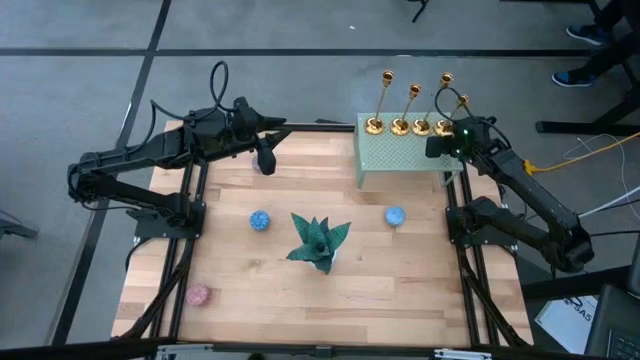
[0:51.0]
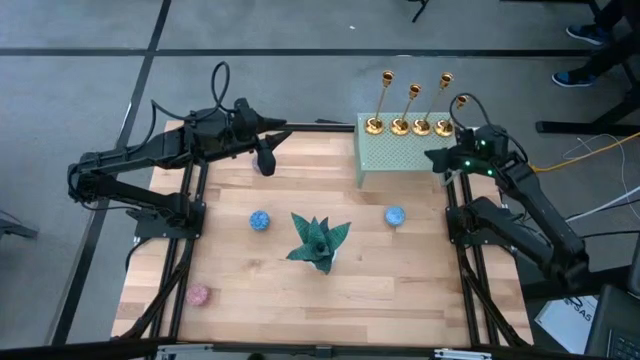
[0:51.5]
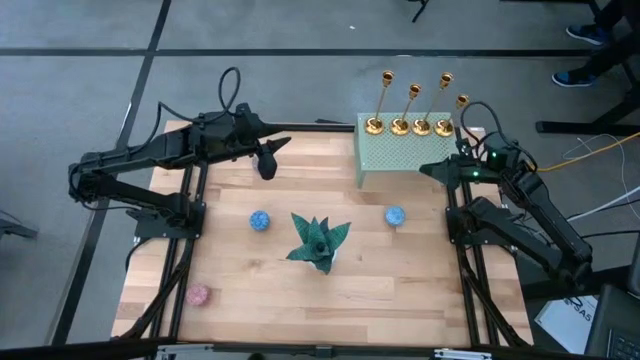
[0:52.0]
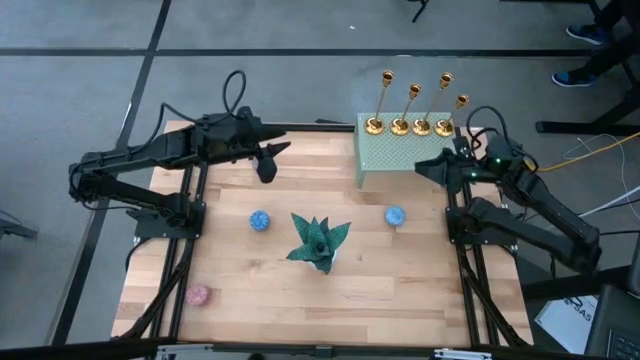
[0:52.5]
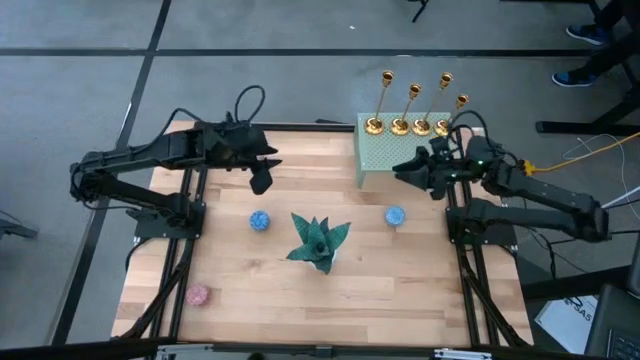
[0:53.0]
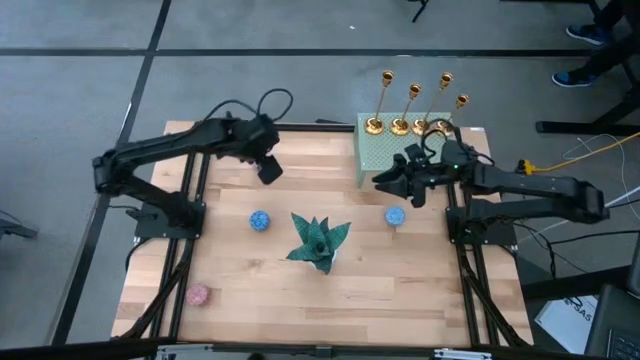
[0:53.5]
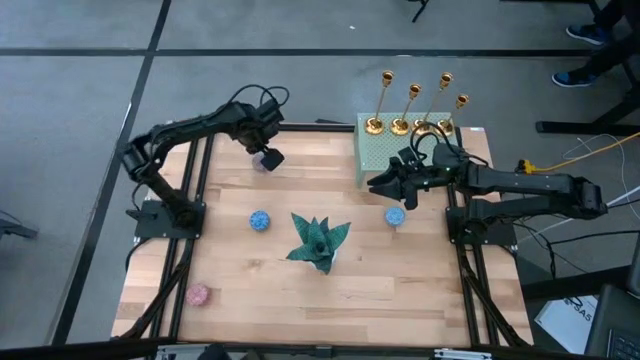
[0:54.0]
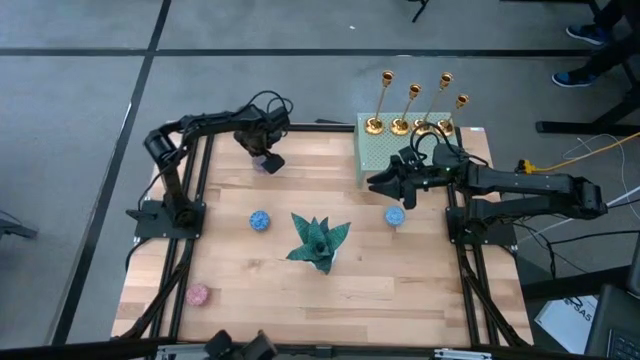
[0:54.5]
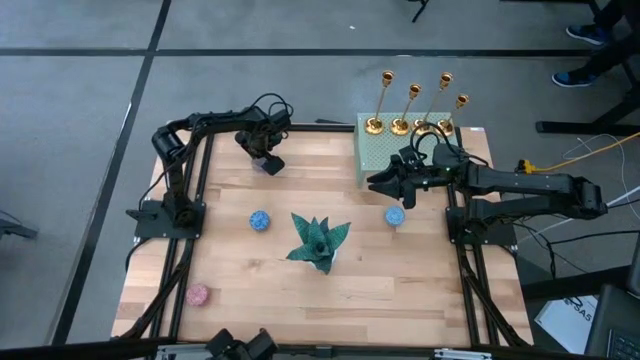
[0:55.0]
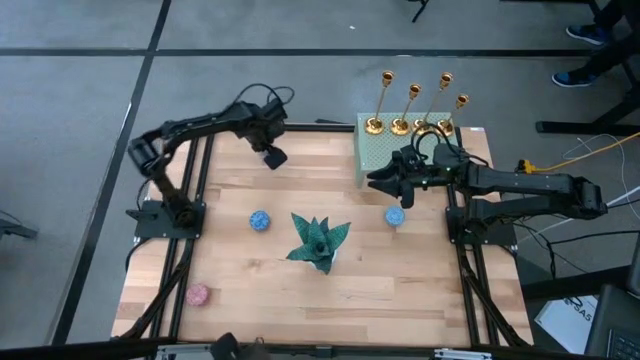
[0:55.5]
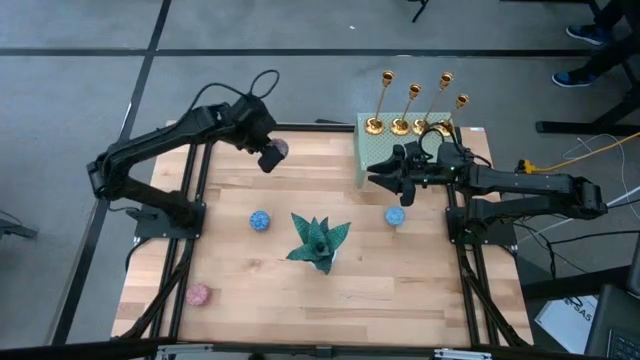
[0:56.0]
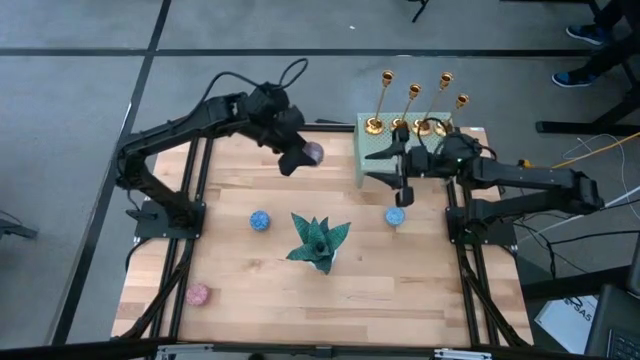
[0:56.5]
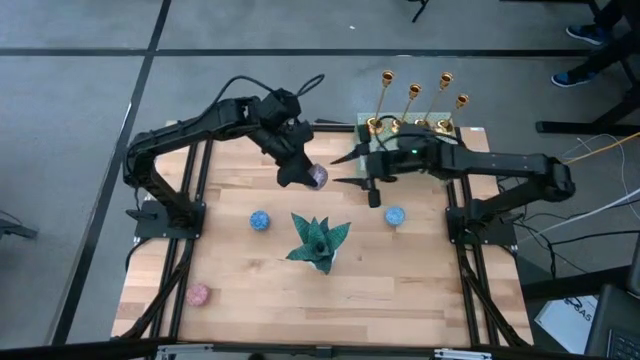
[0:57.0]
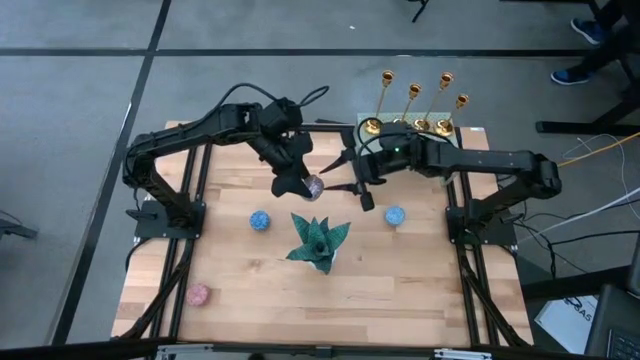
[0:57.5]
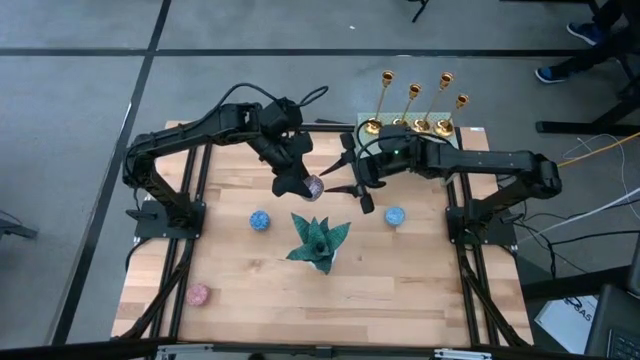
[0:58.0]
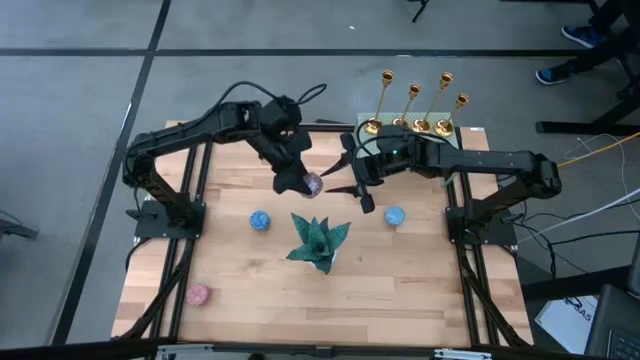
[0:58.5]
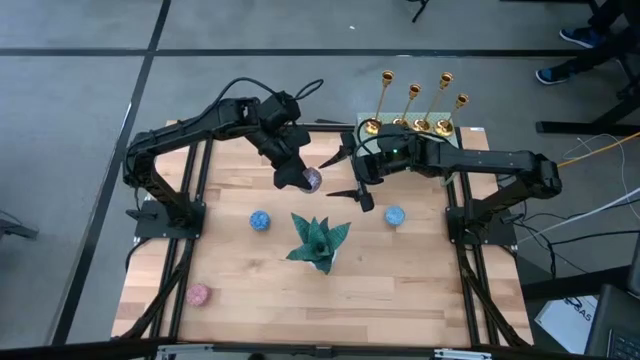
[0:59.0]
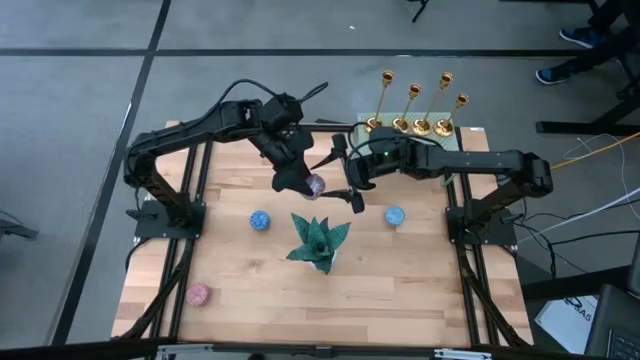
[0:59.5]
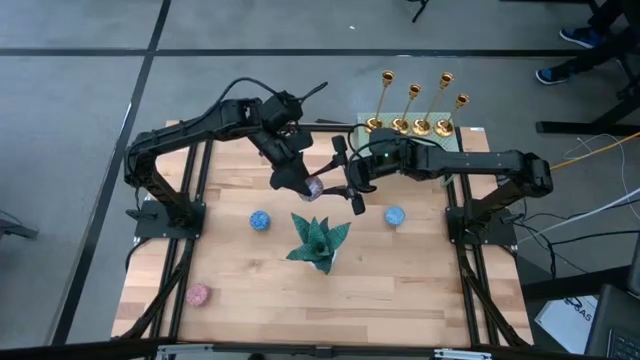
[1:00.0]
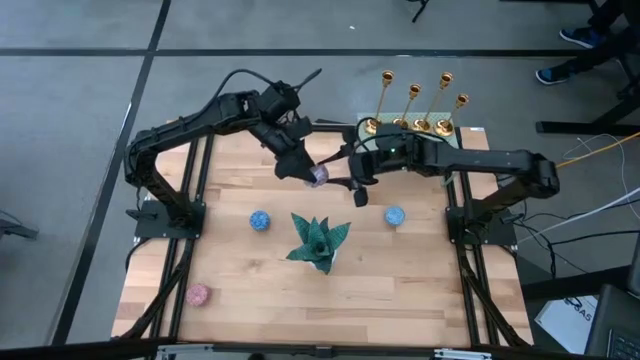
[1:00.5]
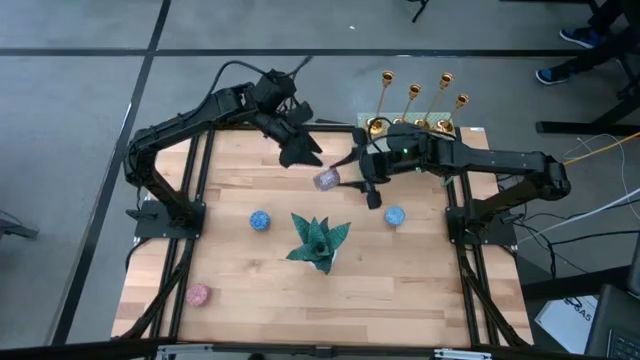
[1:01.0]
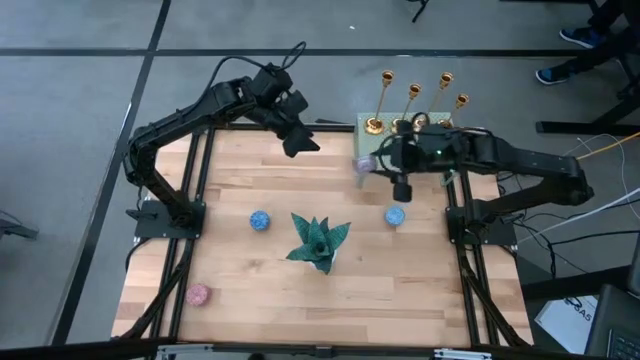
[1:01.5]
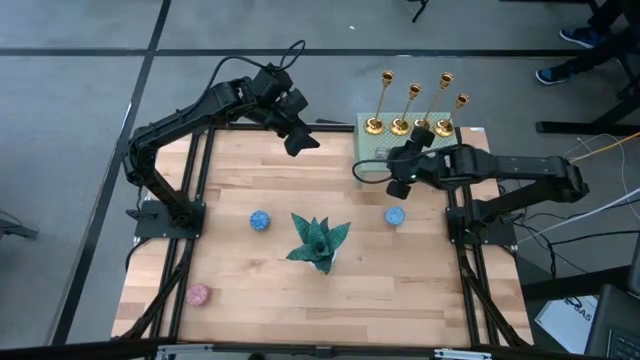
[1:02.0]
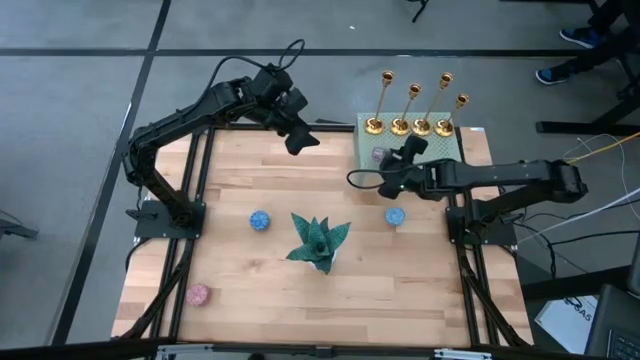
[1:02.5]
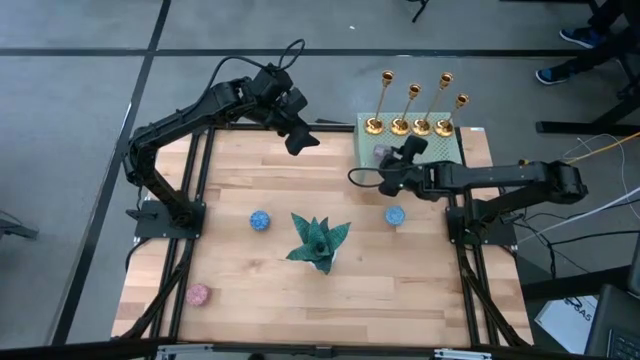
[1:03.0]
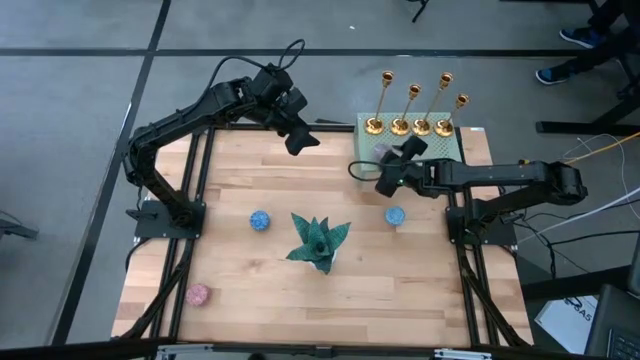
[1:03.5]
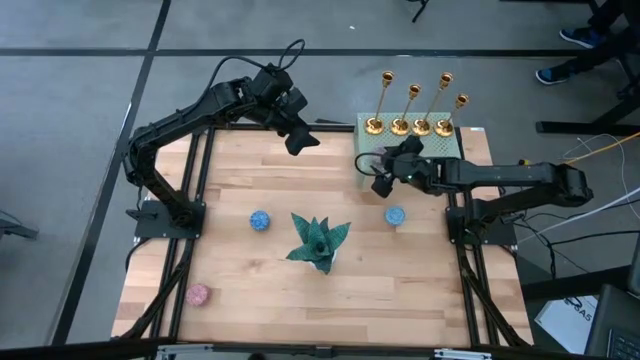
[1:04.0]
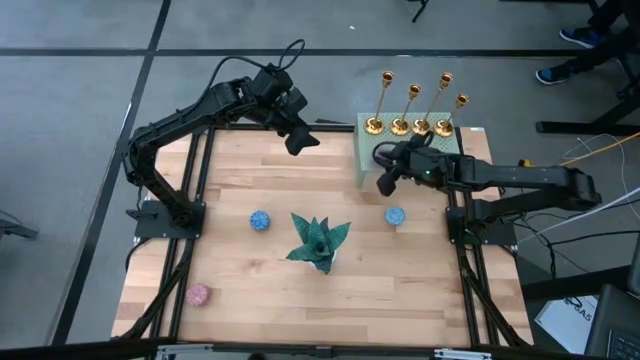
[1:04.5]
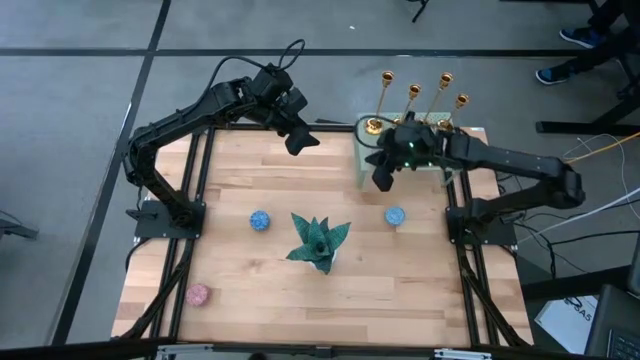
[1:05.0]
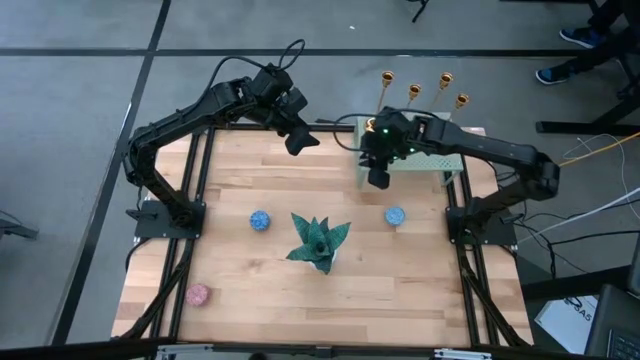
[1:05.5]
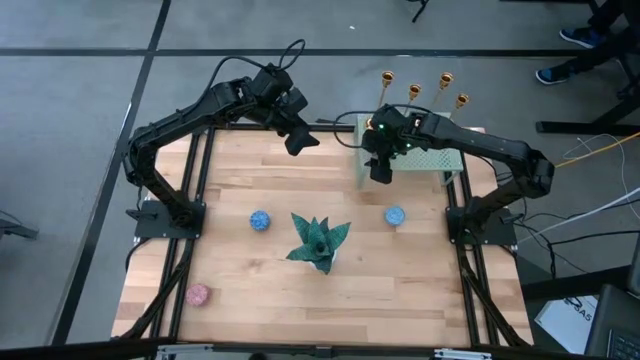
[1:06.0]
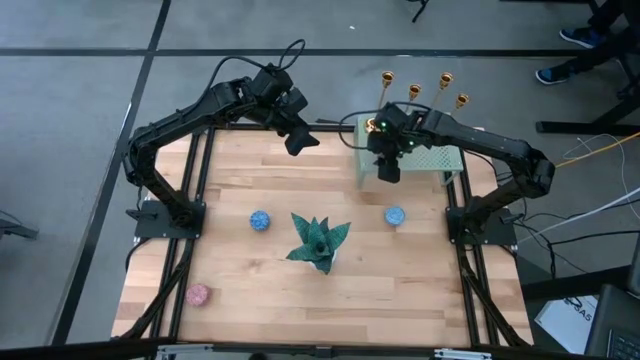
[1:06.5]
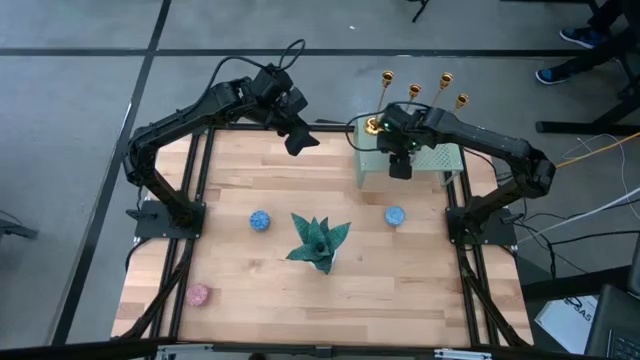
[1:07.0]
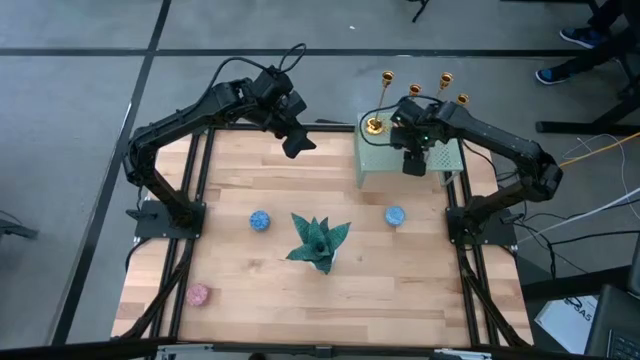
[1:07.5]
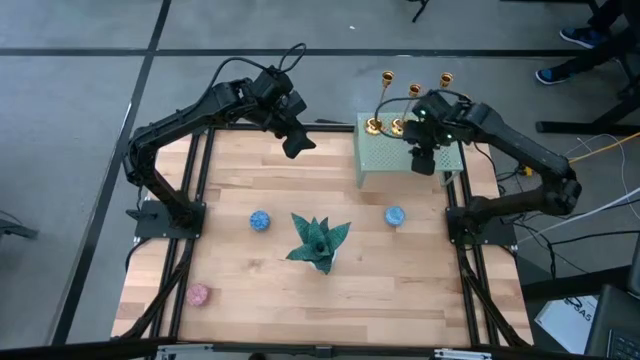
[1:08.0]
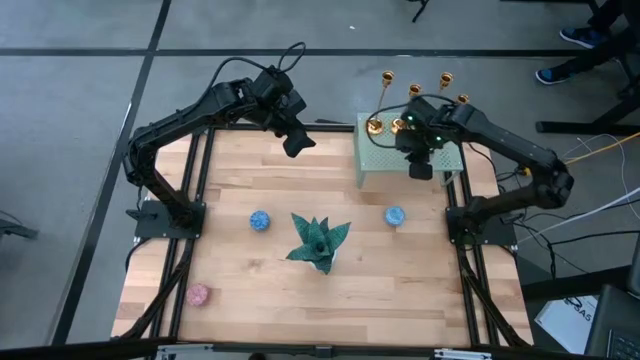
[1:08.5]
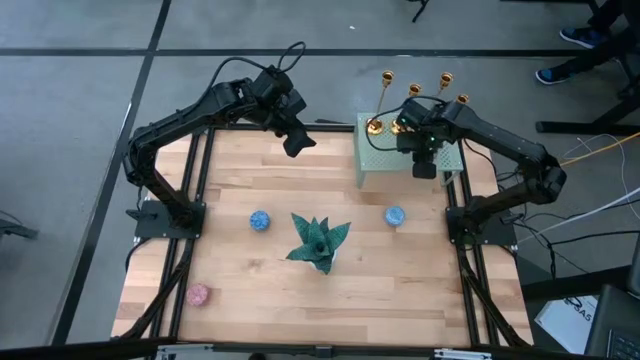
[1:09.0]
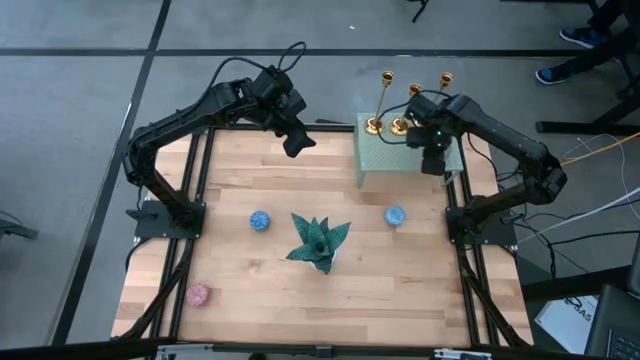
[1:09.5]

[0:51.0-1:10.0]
Task: Stock candles and holders on shelf
Put the red scented candle on the shelf

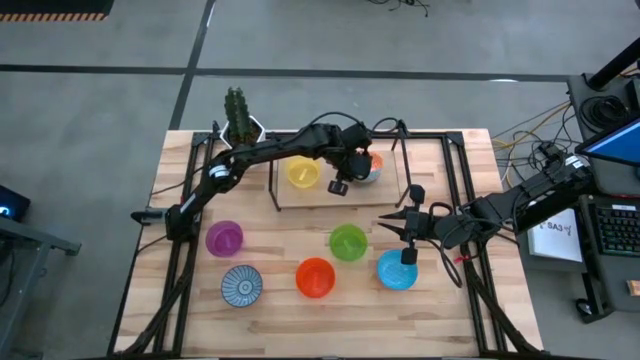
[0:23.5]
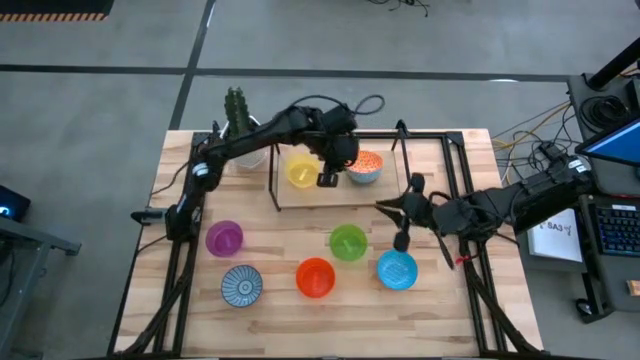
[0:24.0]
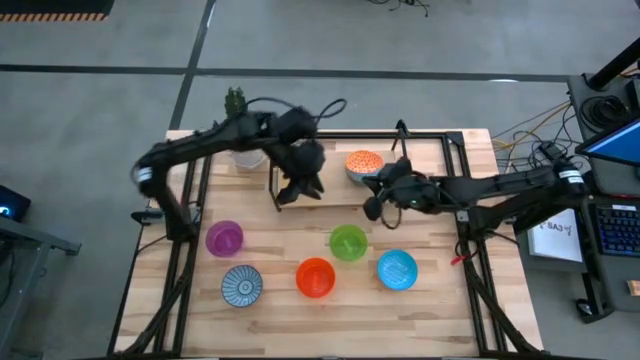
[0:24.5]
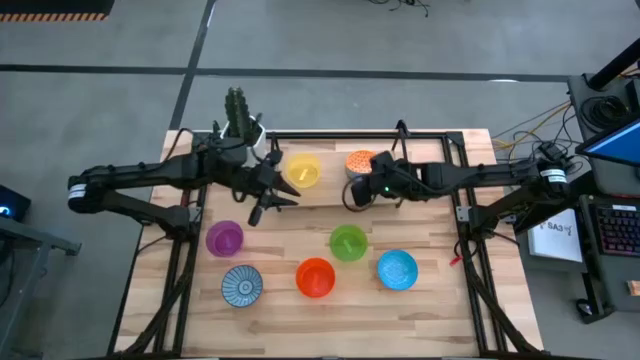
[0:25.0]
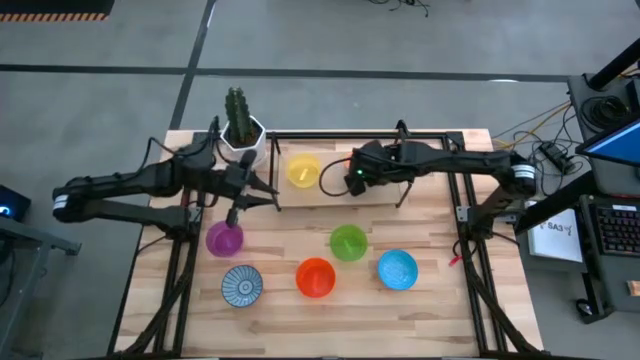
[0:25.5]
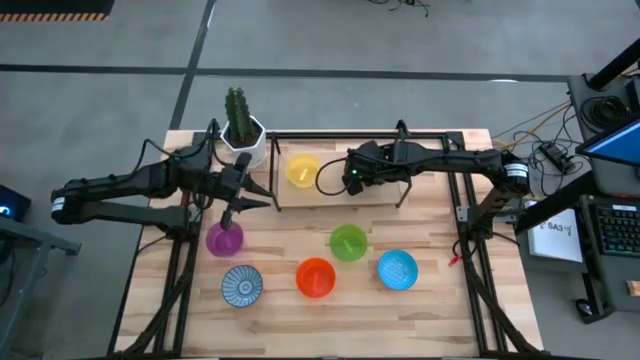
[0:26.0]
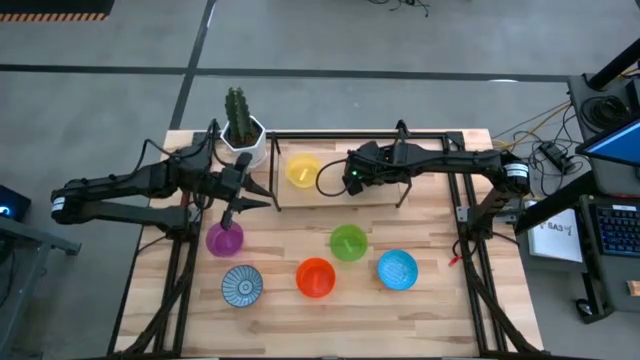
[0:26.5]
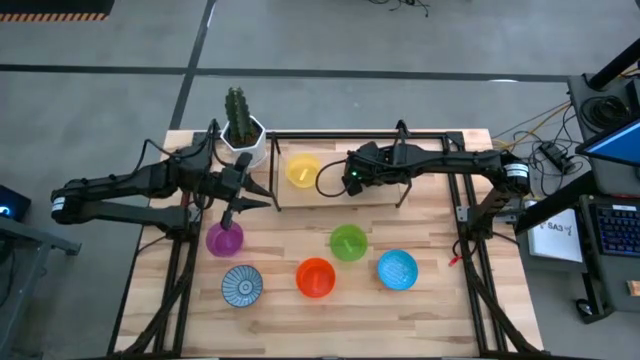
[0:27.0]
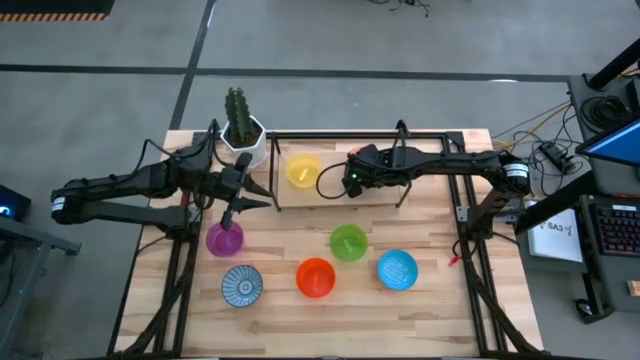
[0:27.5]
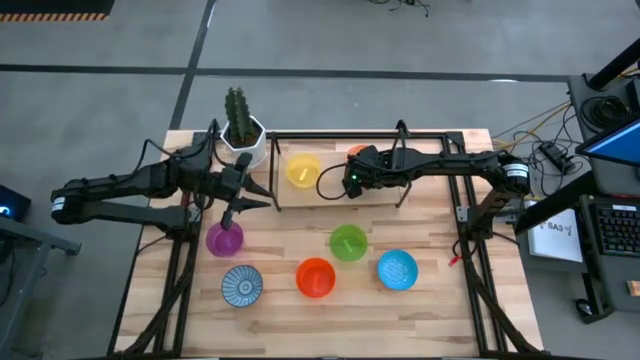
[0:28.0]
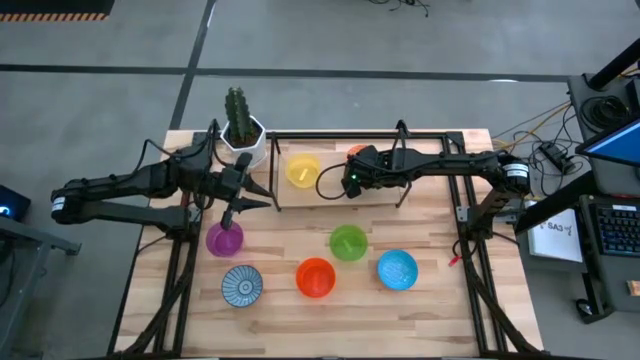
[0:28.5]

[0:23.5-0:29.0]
Task: Place and stack bowls onto a shelf
Adjust the orange pattern bowl
